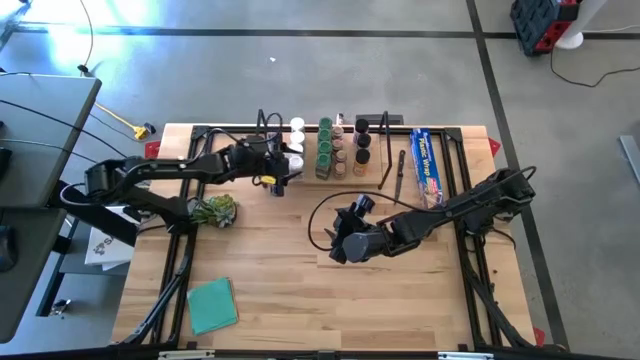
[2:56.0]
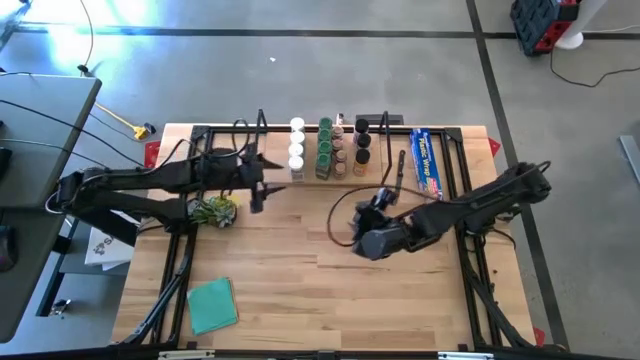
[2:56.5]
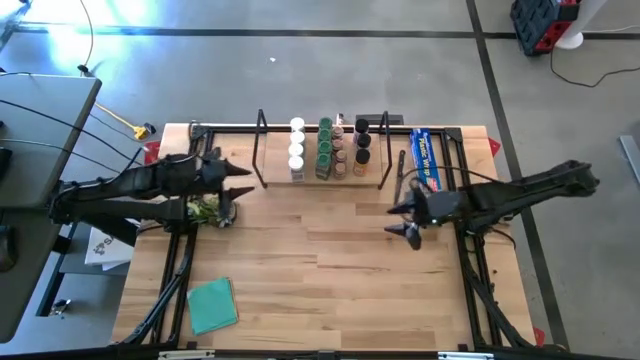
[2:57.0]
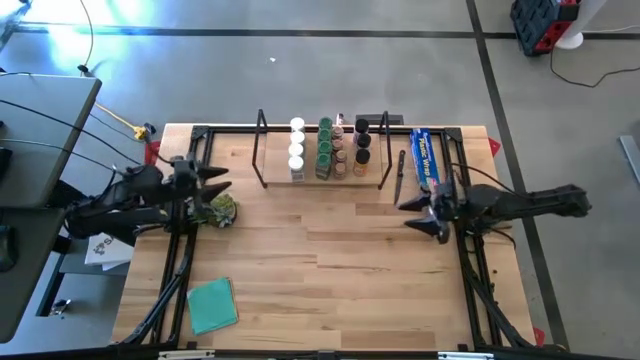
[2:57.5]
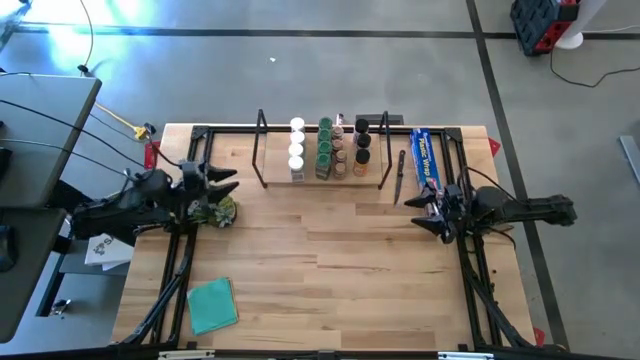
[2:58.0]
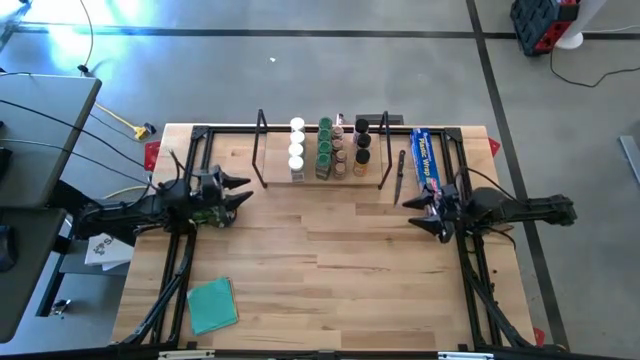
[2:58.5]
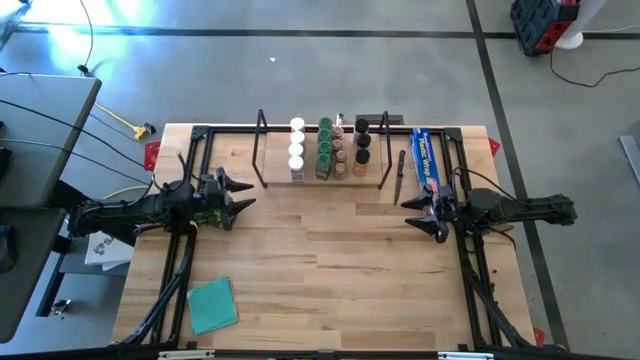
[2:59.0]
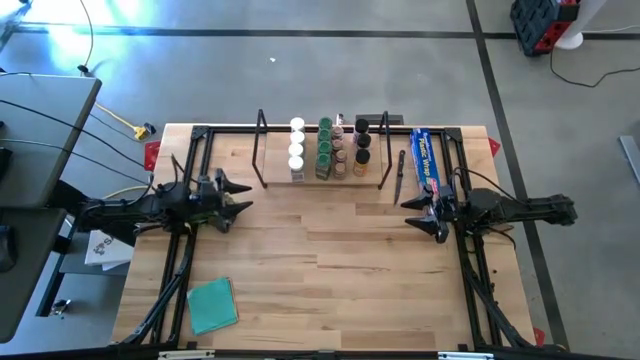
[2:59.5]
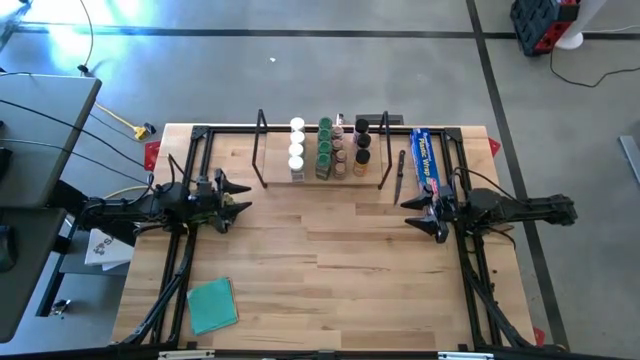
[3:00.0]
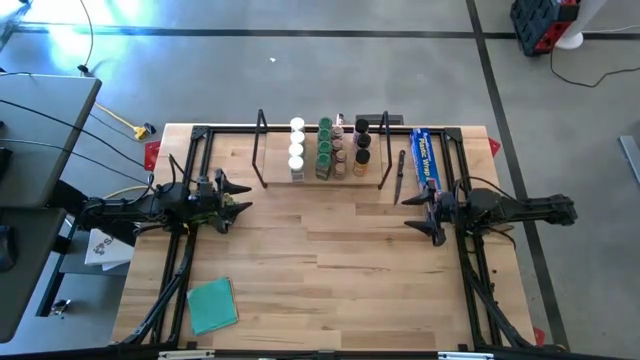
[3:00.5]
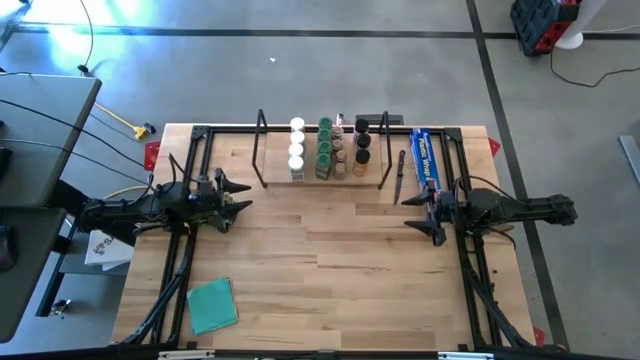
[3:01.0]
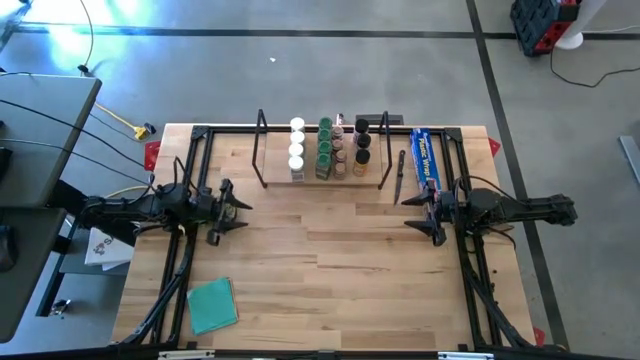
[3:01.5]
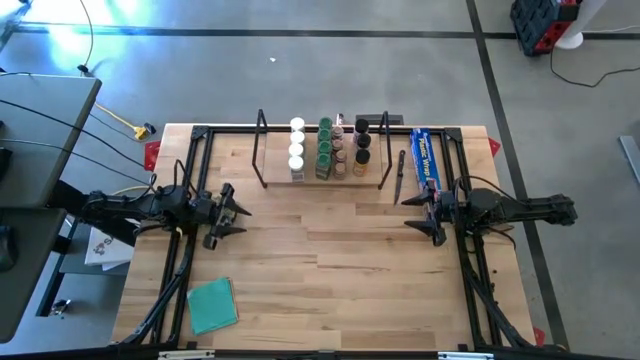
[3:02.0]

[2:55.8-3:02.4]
Task: Shelf spices
Return to Home Position

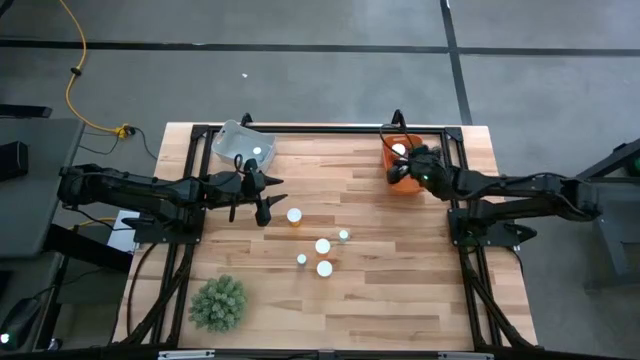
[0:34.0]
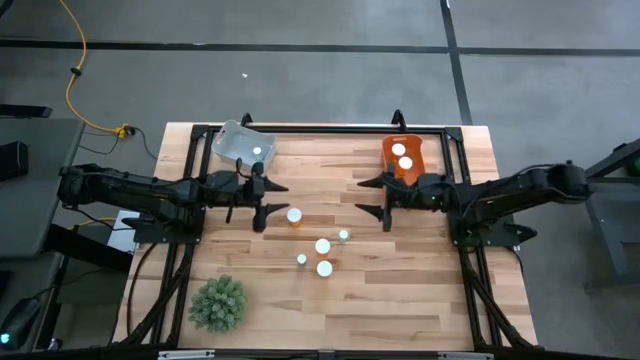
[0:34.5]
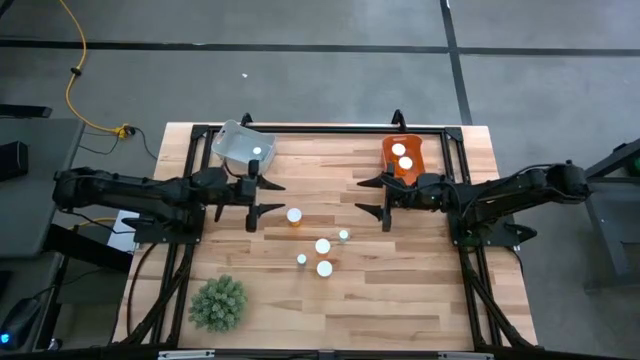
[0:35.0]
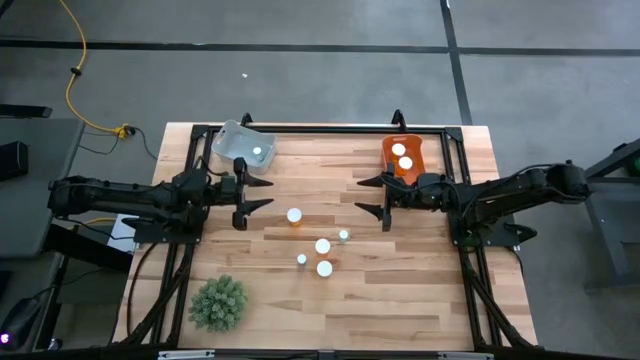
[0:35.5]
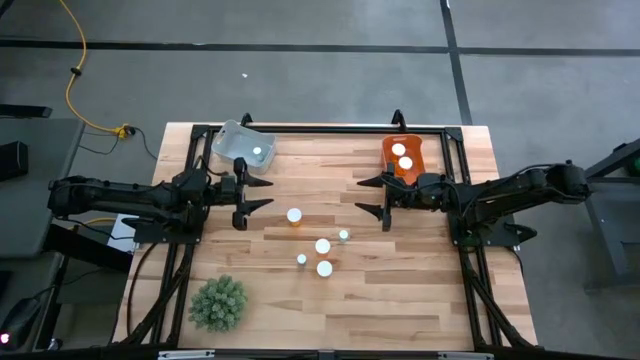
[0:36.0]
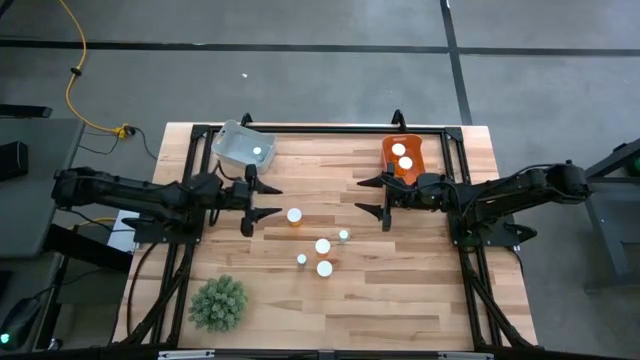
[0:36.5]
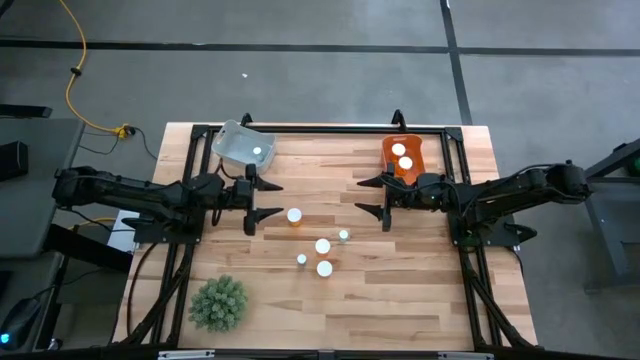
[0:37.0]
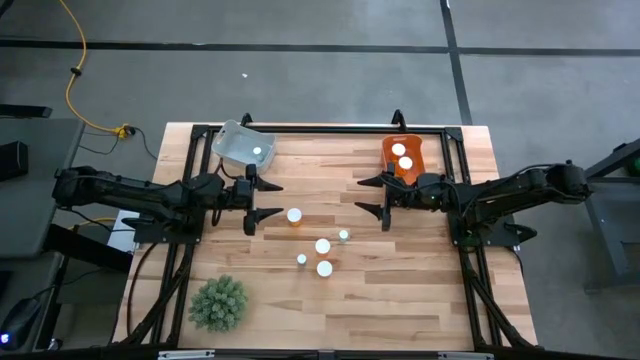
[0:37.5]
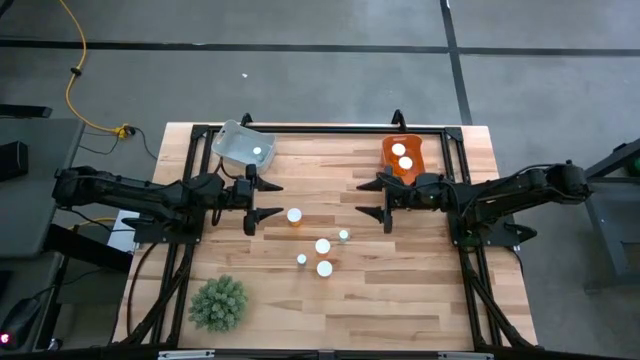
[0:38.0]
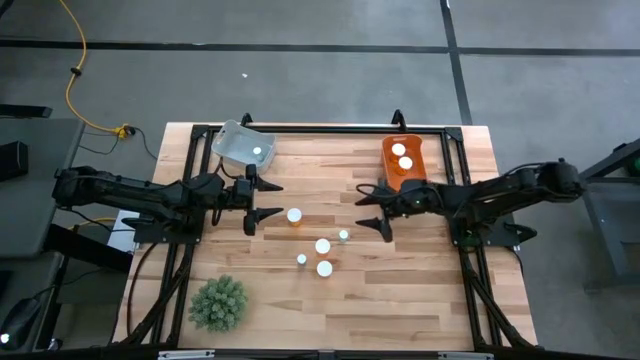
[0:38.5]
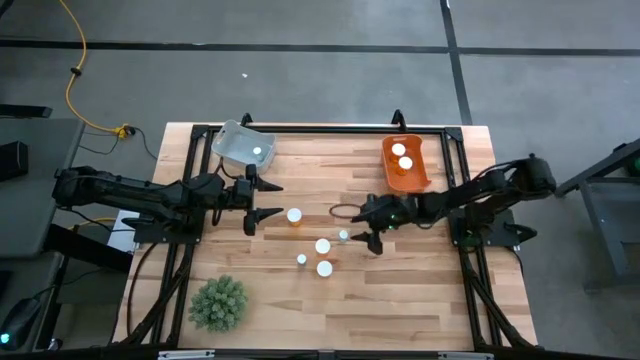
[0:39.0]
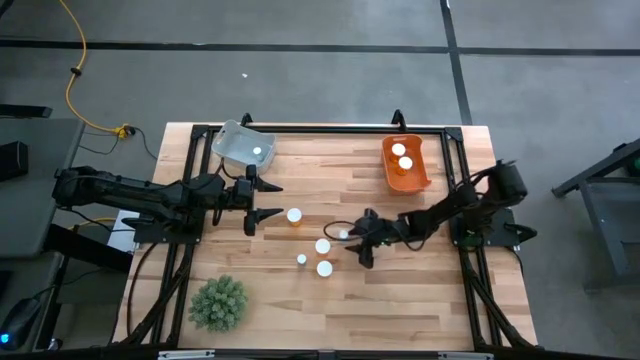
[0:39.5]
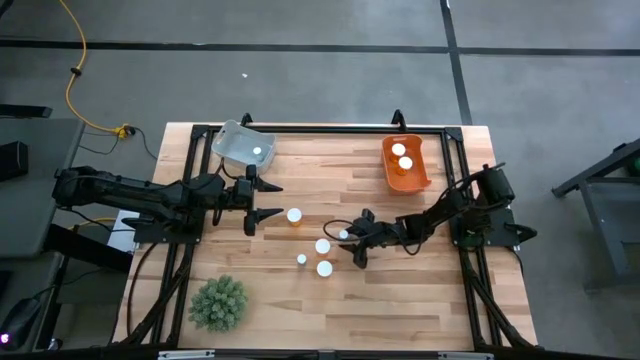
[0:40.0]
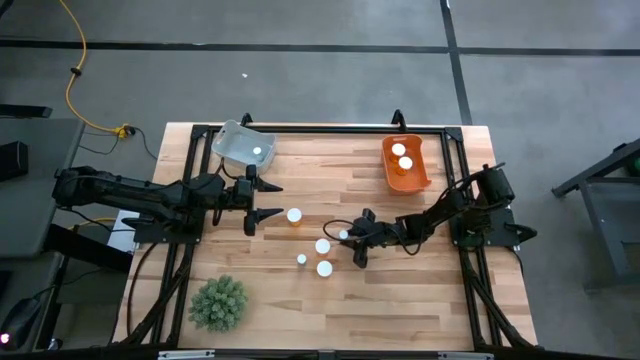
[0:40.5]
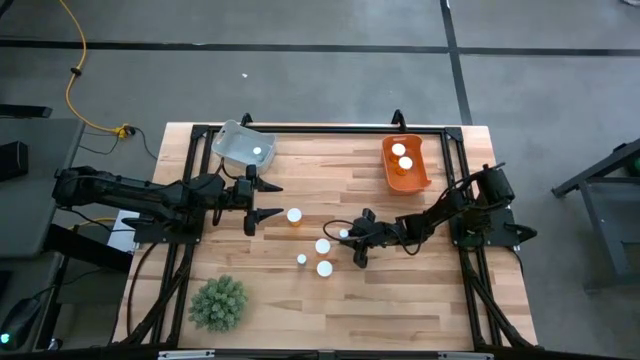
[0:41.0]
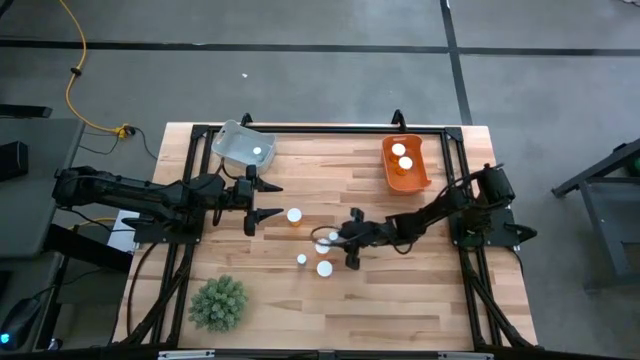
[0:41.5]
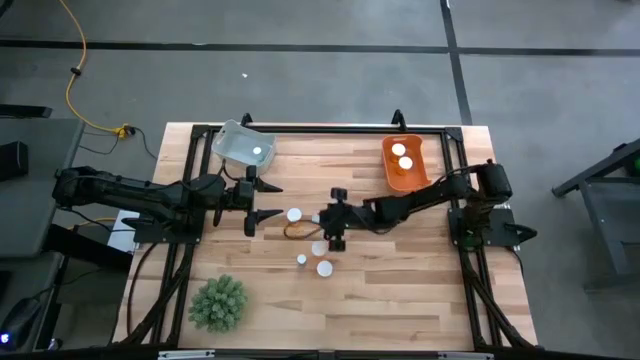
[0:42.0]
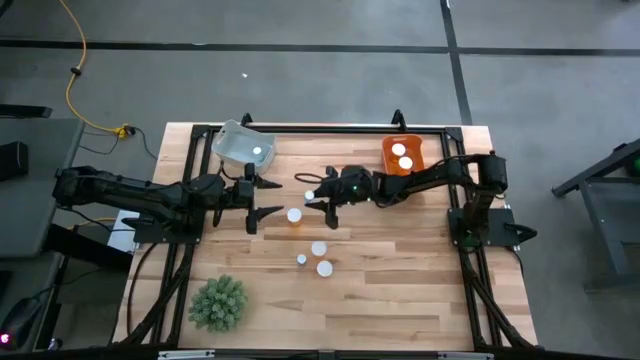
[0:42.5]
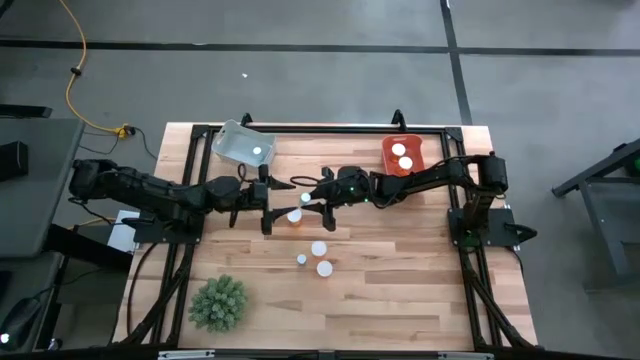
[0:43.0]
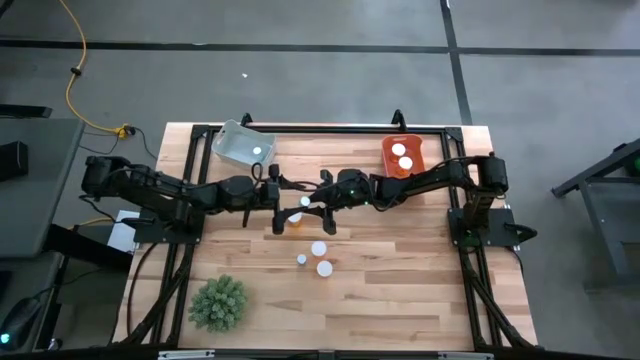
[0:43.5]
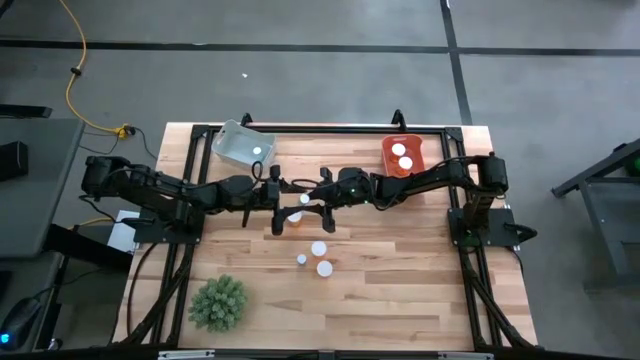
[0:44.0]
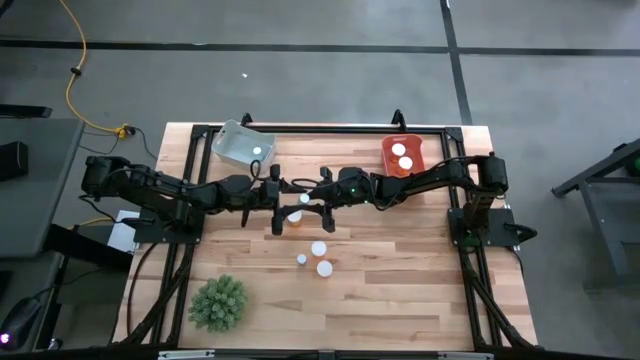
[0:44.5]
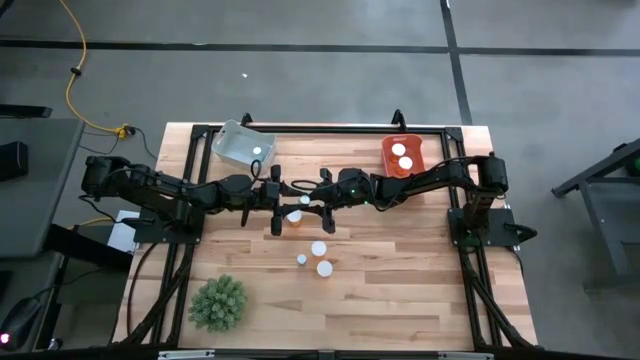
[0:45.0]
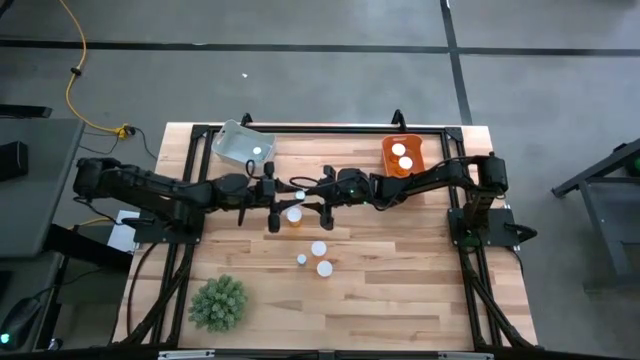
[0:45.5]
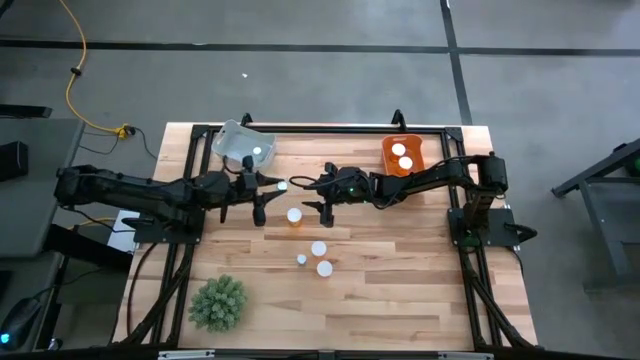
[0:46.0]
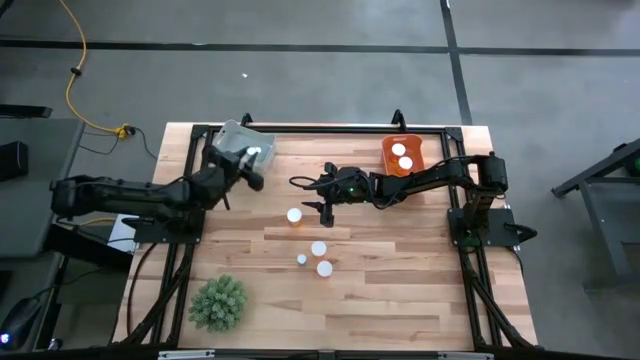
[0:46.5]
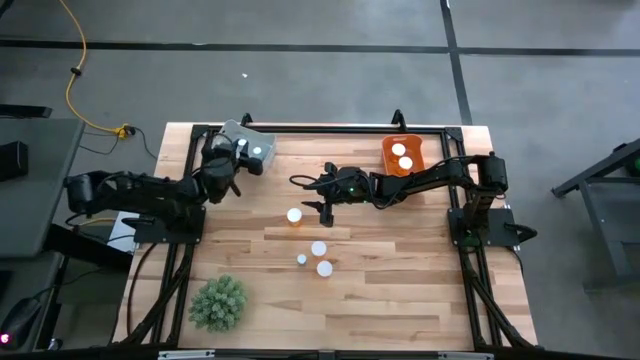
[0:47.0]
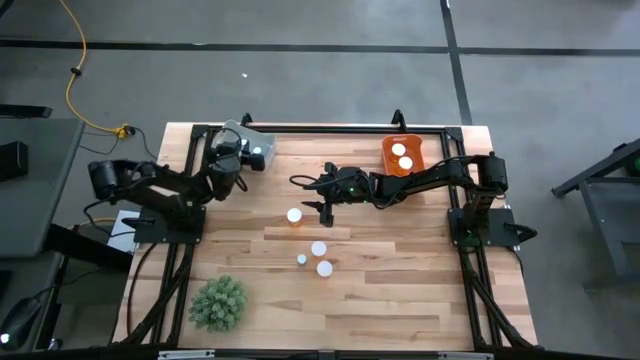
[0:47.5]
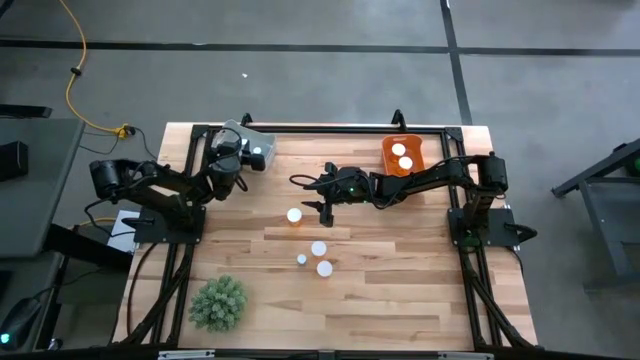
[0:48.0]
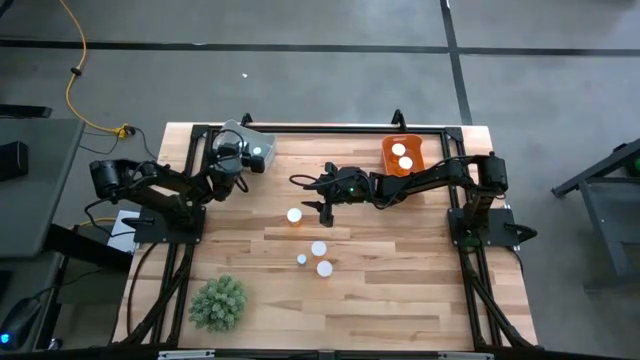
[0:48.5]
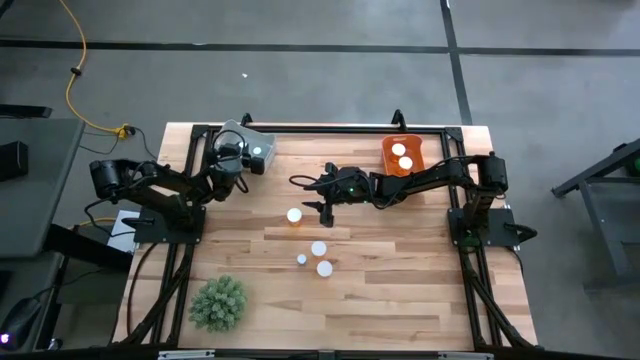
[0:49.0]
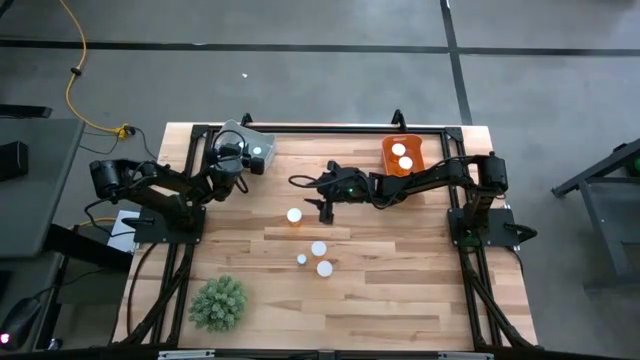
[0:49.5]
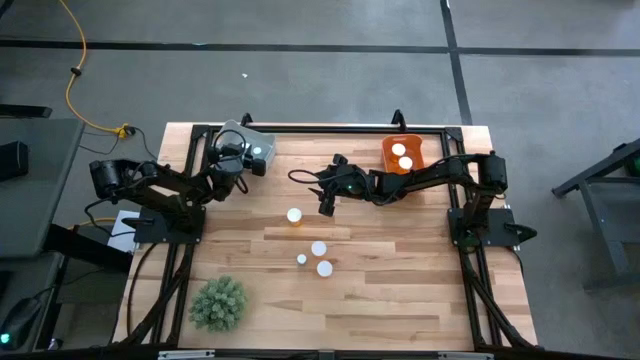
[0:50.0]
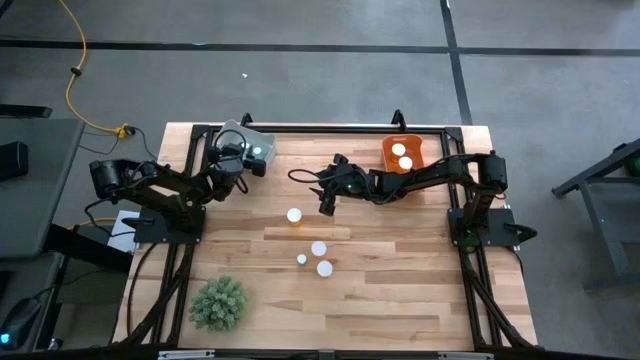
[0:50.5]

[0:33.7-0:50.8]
Task: Pick and place medicine bottles into bin by pill shape (circle, oval)
Put the right blue tablet bottle into the gray bin
